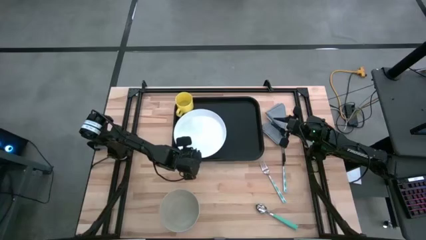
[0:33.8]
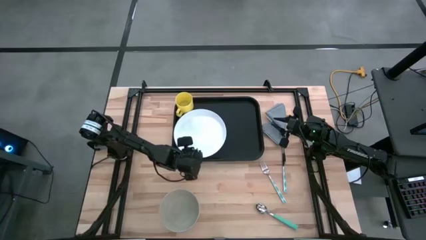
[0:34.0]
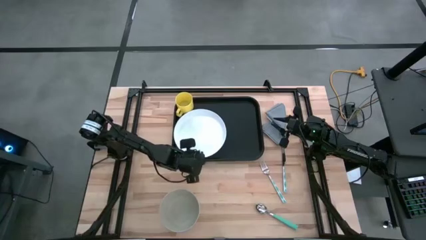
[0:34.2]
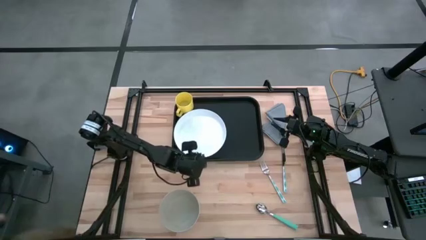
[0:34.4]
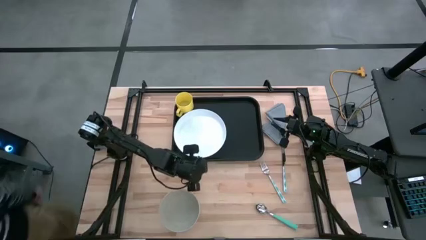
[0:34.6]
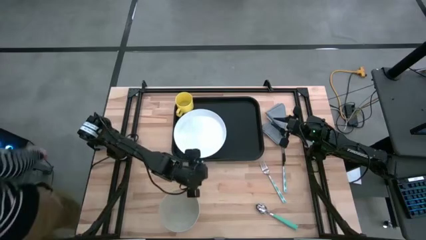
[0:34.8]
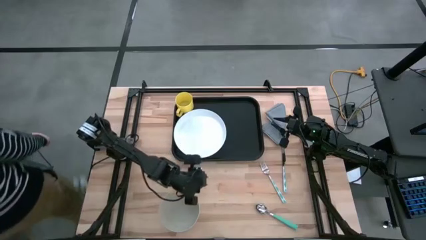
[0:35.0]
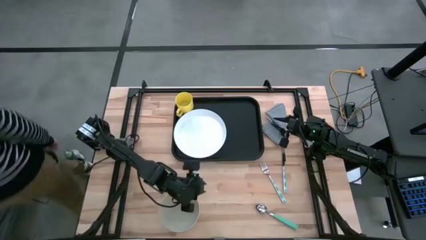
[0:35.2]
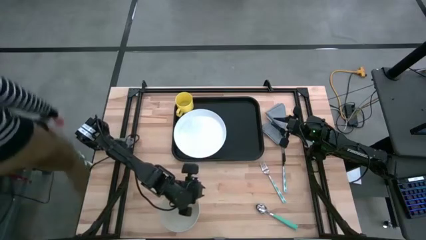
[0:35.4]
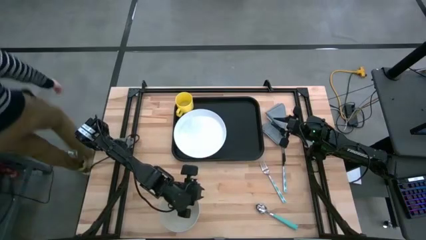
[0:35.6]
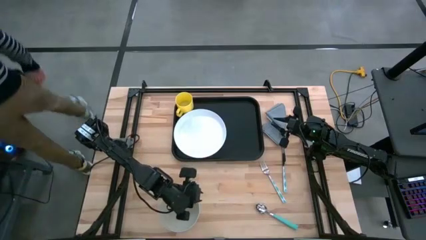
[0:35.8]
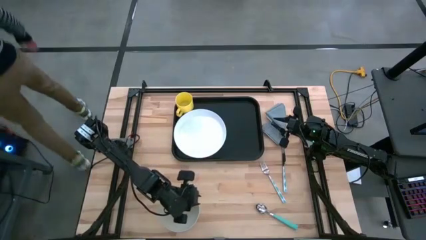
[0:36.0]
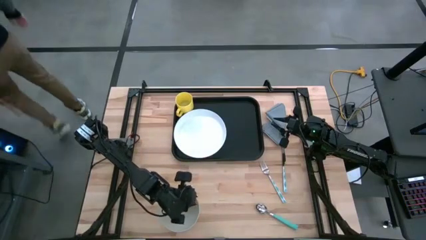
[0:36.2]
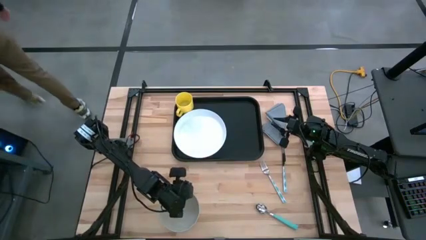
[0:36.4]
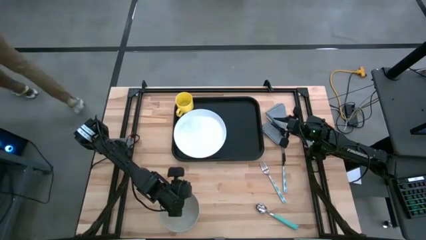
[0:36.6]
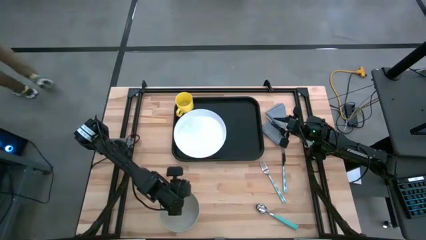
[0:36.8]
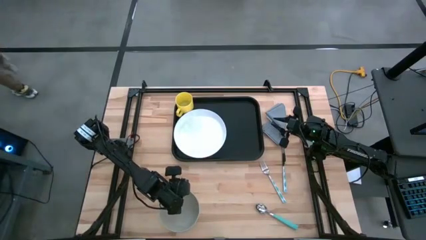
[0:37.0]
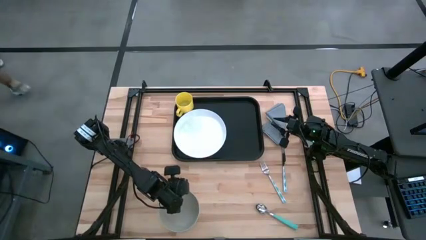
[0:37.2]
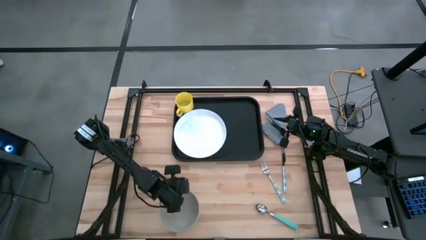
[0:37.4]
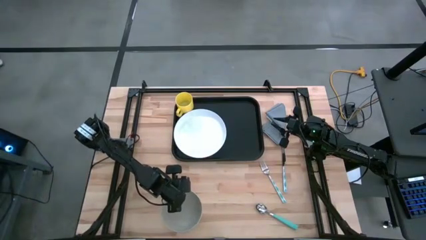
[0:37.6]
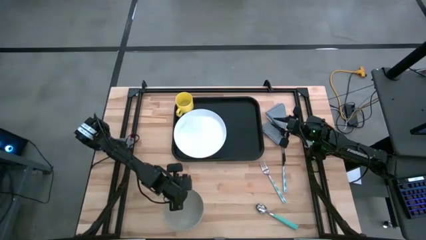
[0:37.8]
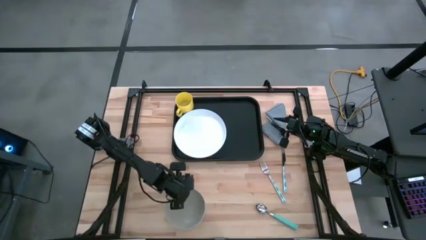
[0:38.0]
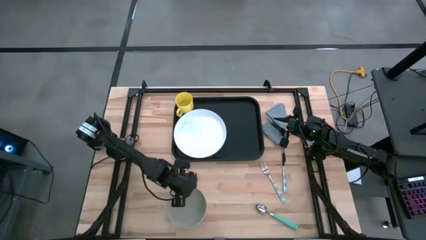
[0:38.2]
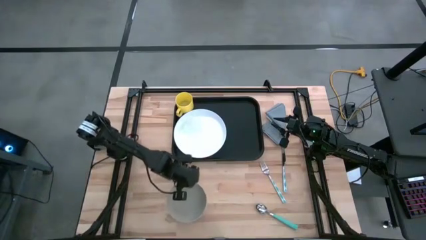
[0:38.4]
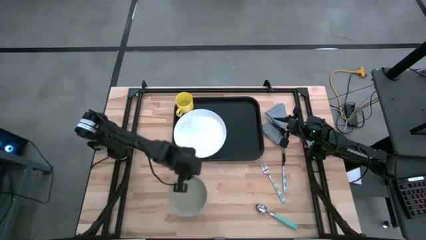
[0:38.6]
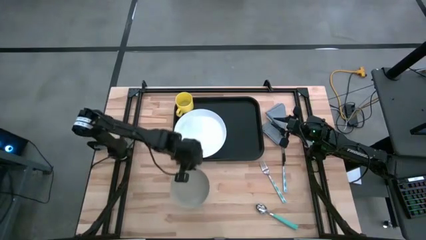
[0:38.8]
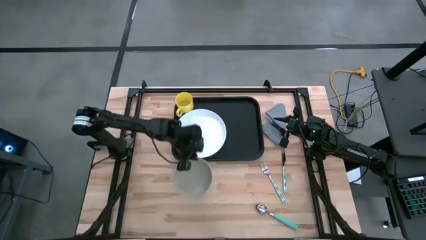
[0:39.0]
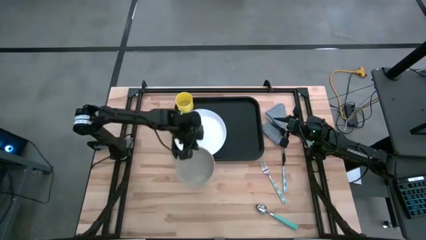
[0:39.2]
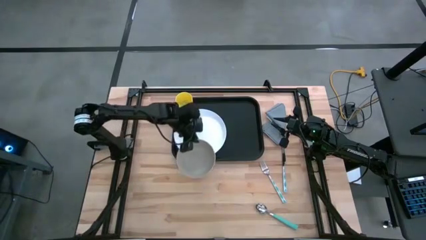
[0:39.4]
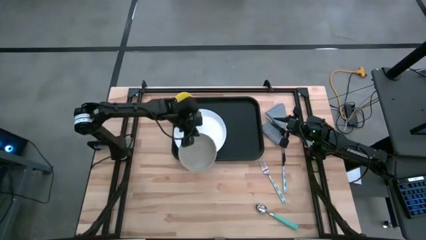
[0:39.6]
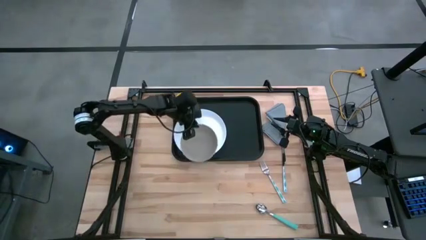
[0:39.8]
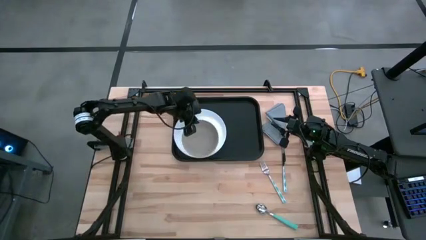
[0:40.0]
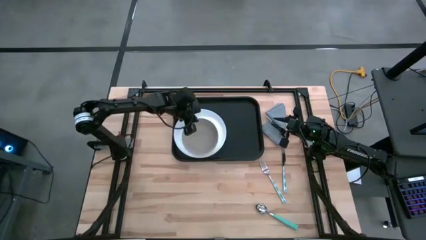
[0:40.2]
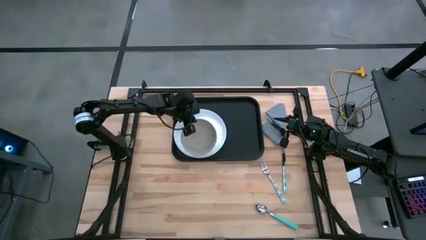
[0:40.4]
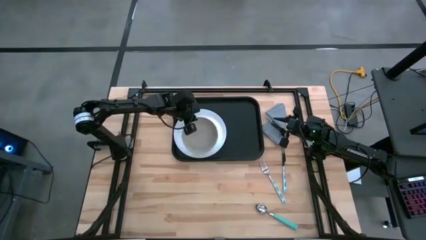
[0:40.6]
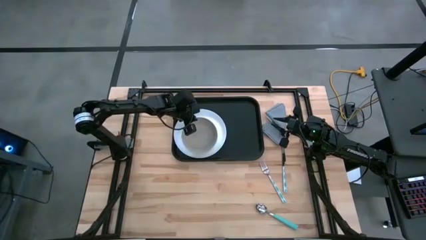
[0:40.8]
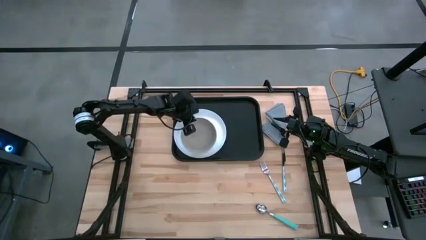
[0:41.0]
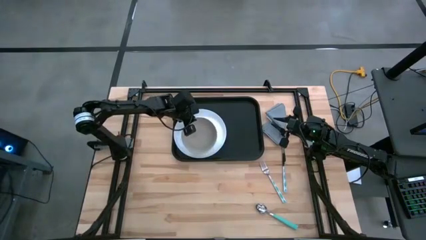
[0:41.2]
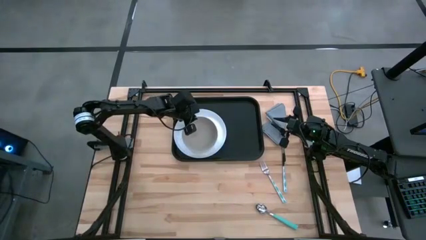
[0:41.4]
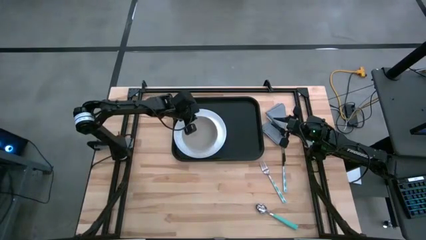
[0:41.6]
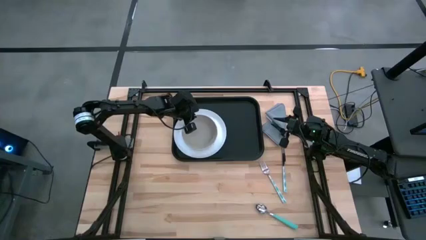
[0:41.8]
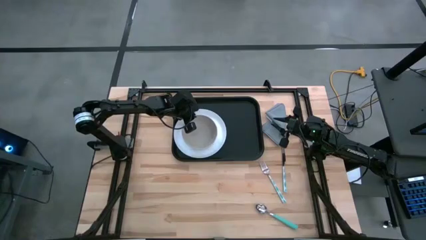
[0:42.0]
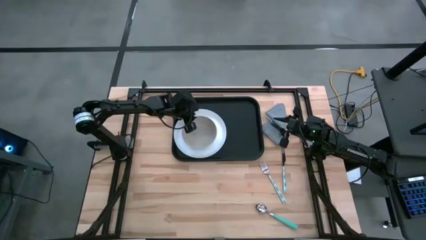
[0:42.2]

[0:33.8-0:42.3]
Task: Set up tray
Put the gray bowl on the white plate to the bottom of the yellow mug

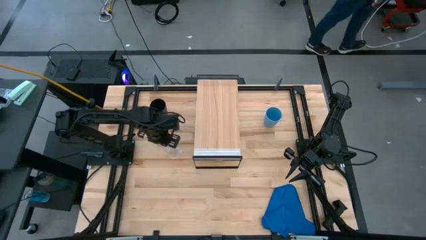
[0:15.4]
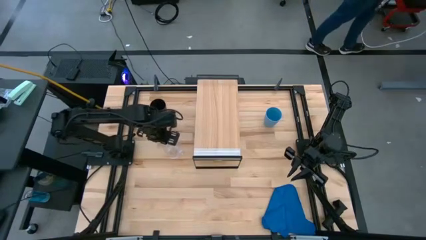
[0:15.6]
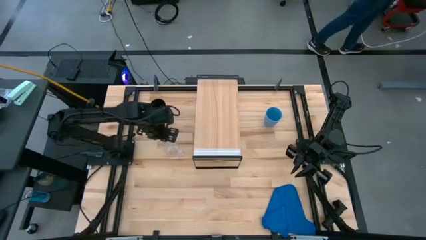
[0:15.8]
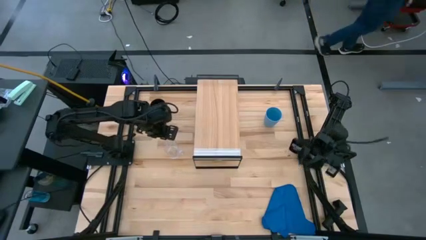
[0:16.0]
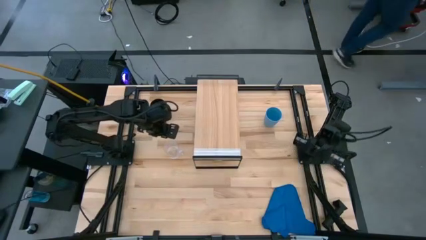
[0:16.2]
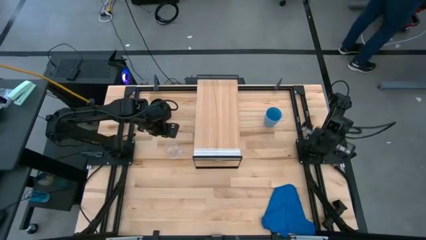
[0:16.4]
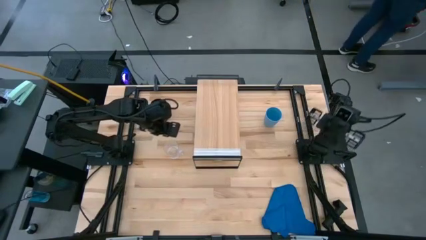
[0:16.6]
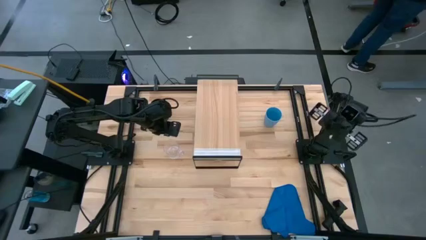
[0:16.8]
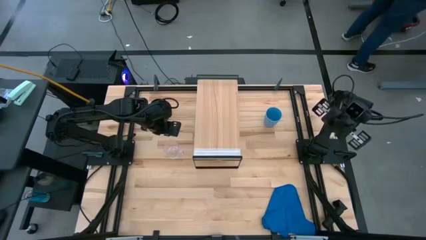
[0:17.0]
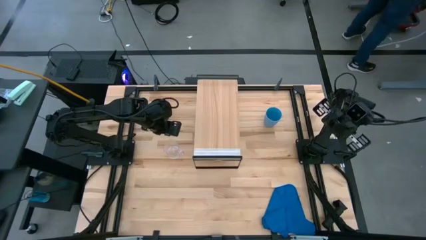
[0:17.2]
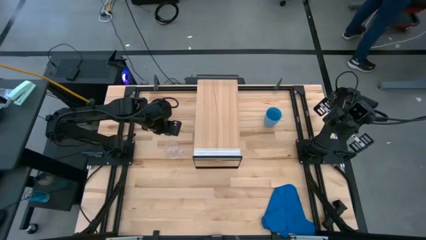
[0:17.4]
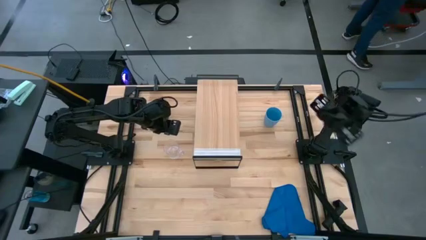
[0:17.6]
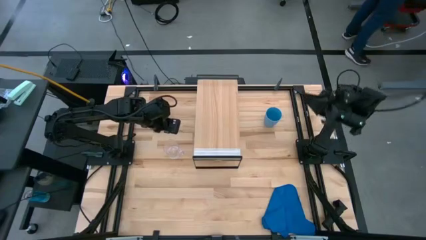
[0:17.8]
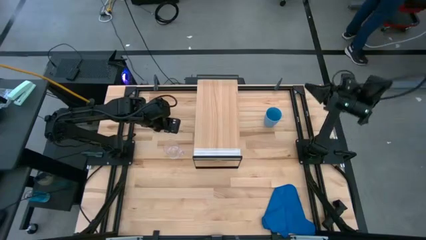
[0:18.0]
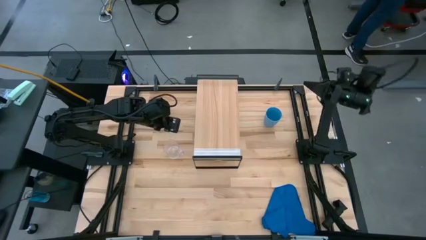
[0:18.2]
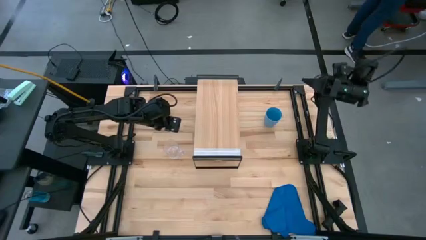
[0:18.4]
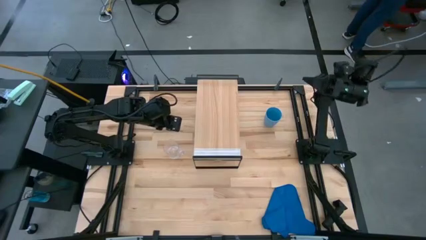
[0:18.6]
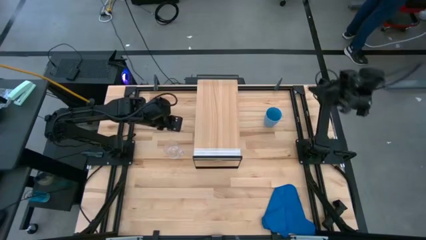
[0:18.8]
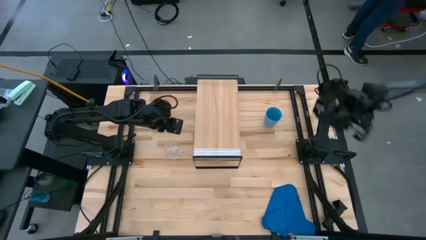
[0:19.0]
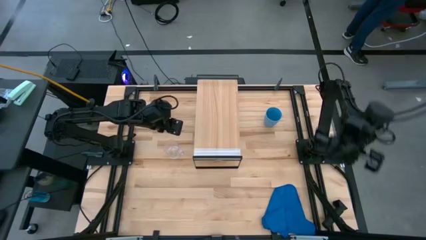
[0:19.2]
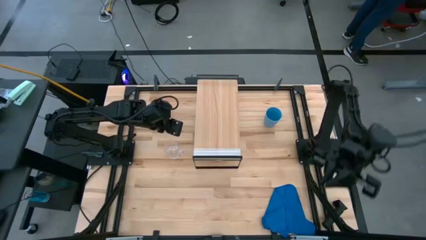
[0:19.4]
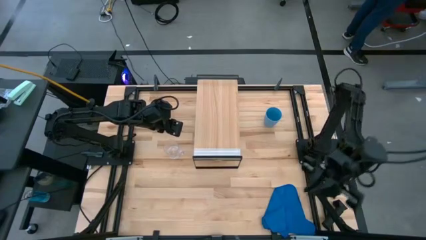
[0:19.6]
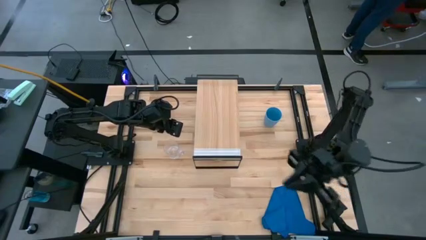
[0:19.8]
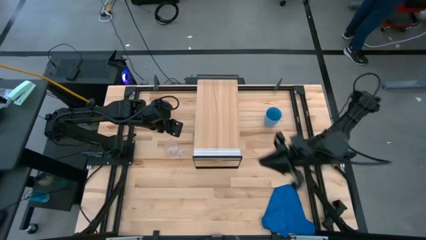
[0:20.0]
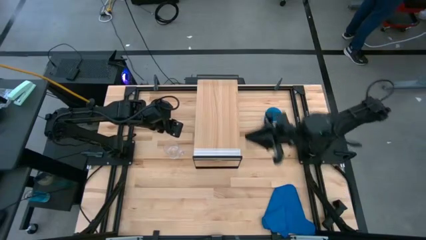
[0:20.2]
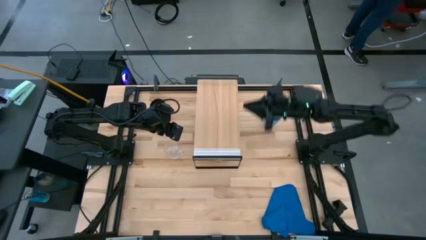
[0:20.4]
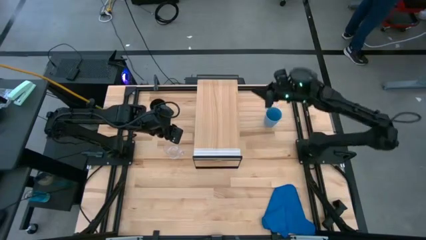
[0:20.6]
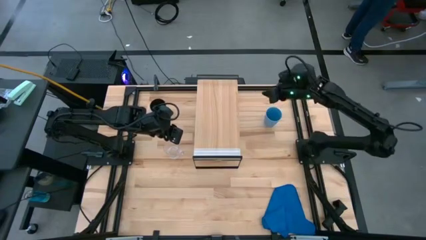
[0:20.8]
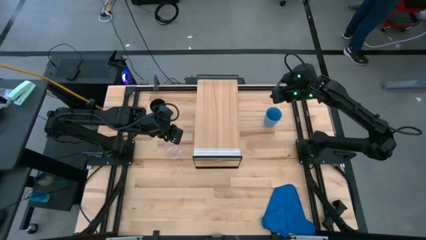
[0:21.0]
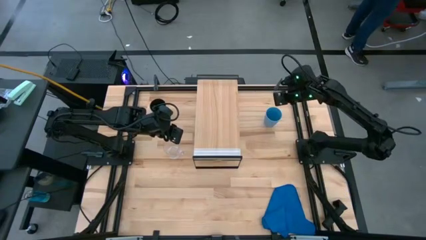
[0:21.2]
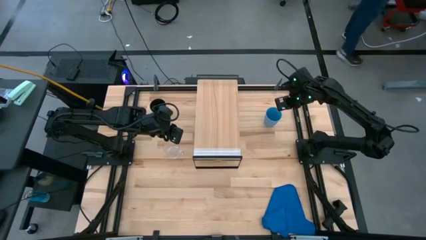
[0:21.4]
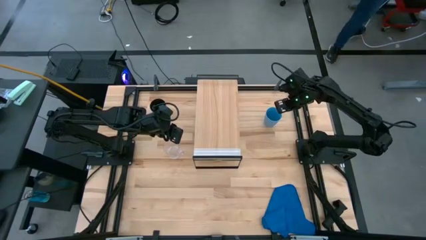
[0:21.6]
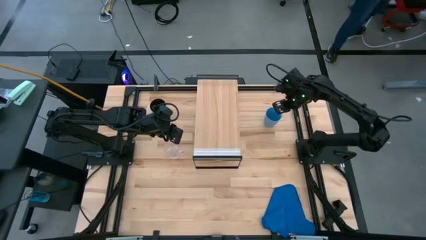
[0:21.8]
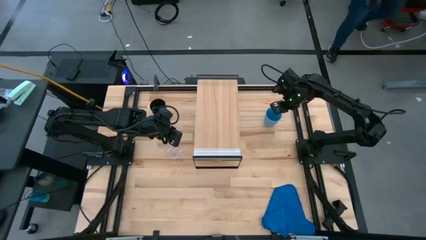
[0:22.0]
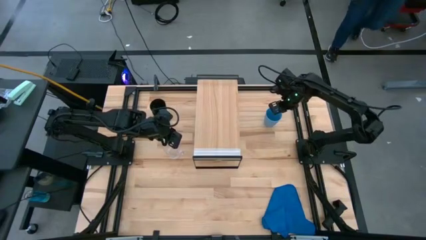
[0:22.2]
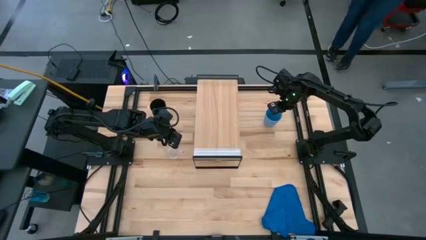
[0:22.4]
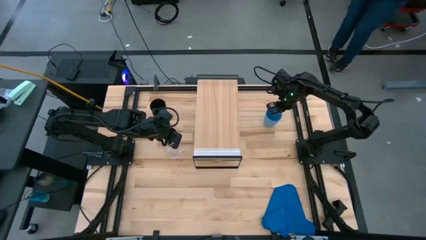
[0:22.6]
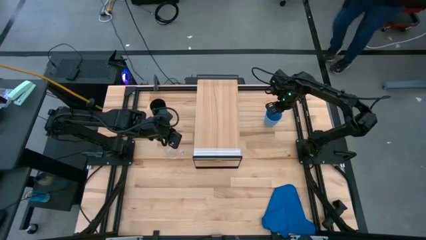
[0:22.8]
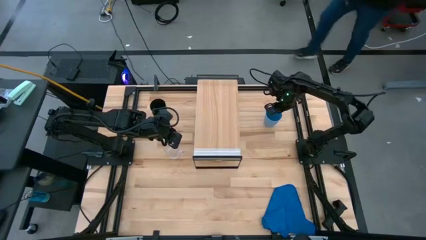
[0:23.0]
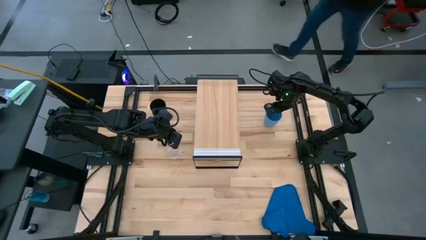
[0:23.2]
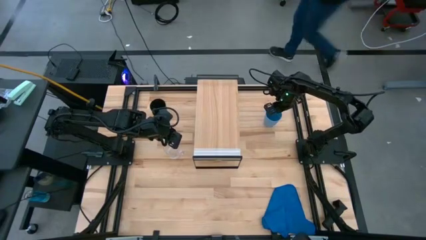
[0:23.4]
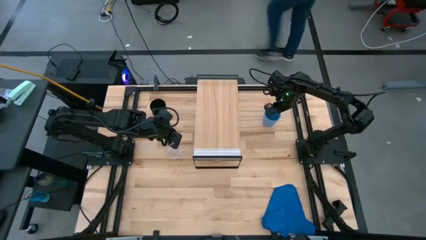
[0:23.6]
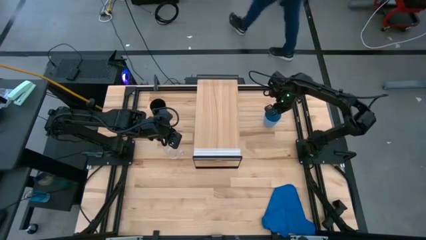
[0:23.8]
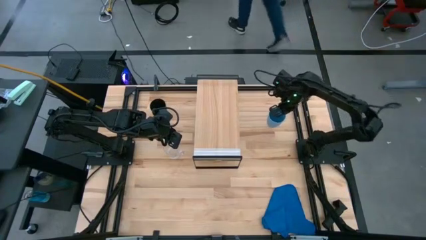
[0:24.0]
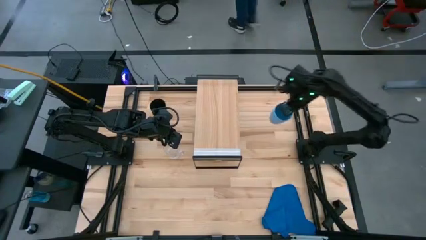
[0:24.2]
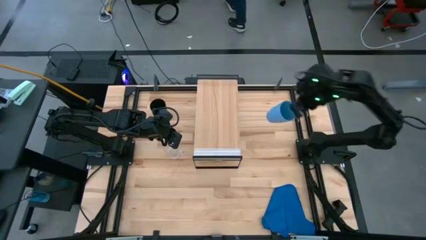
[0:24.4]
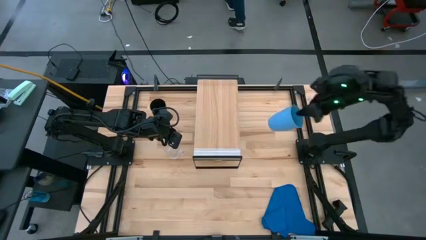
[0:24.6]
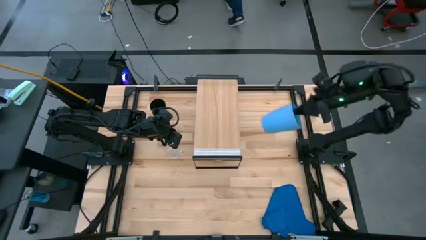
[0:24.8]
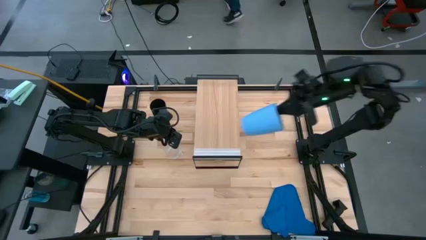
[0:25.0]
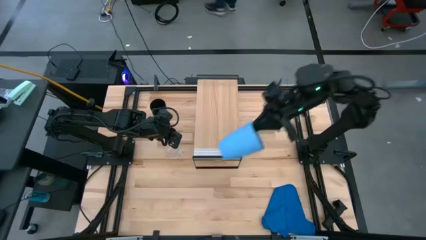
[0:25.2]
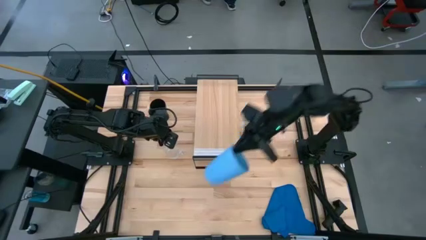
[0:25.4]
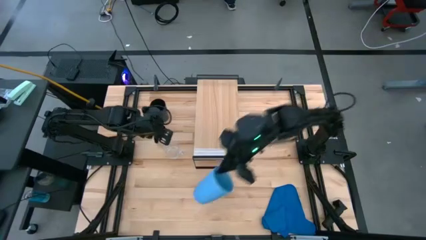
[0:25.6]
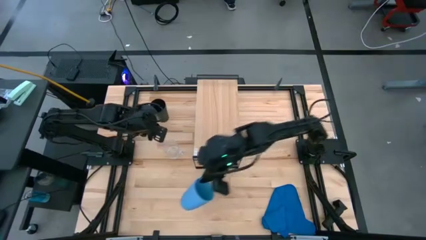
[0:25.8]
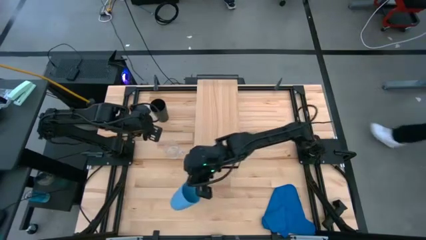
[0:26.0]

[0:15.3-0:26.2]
Task: Stack small to large cups/mugs on shelf
Move the blue cup to the middle left of the table
